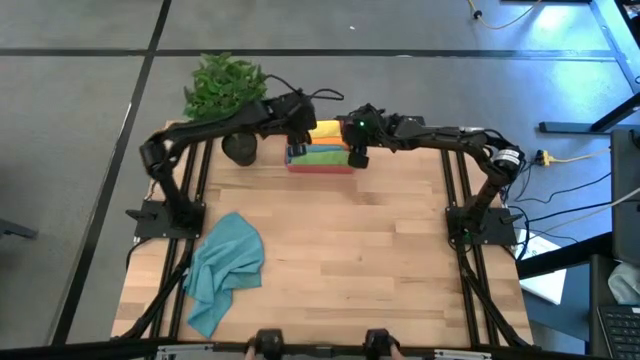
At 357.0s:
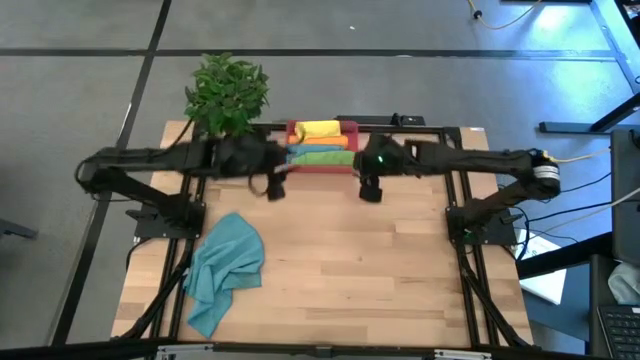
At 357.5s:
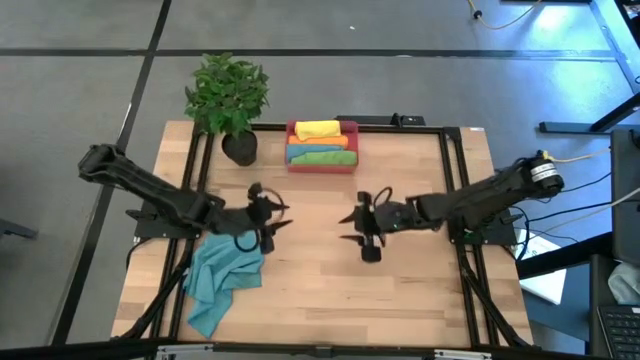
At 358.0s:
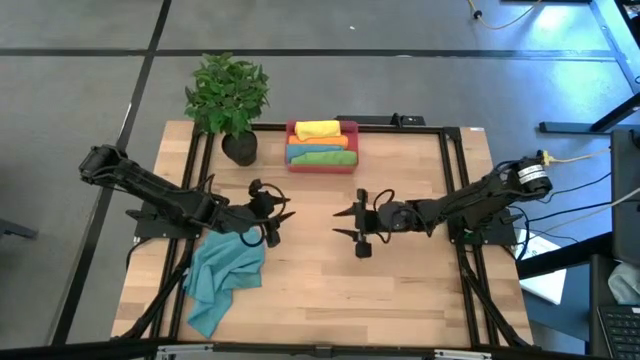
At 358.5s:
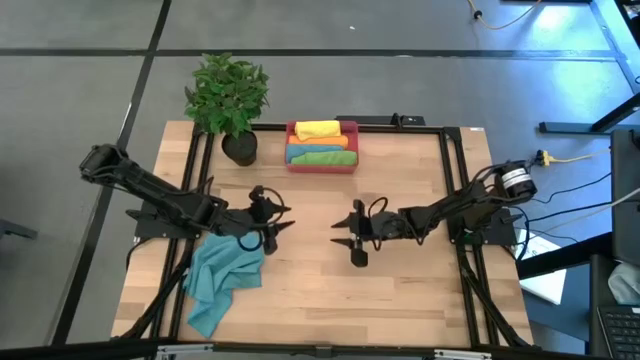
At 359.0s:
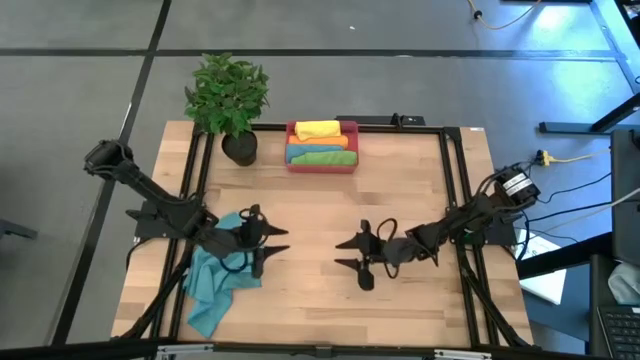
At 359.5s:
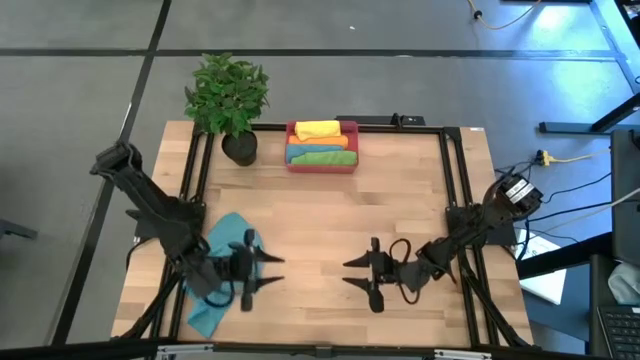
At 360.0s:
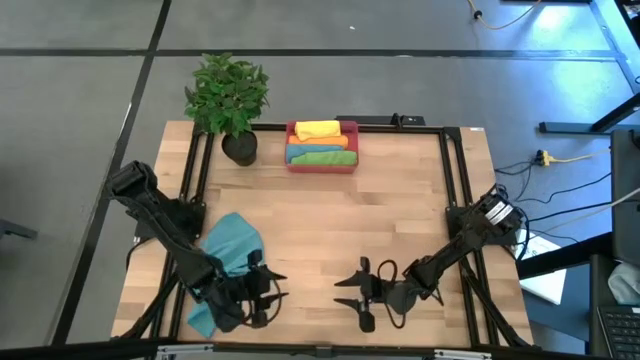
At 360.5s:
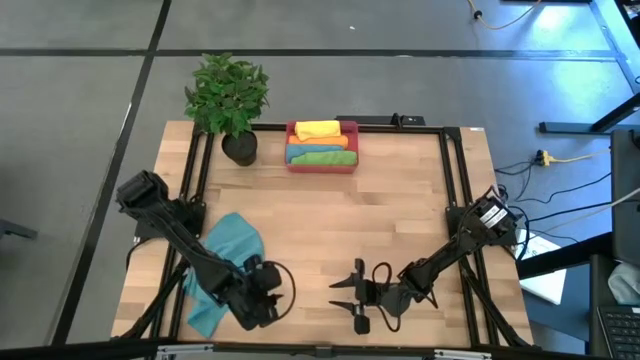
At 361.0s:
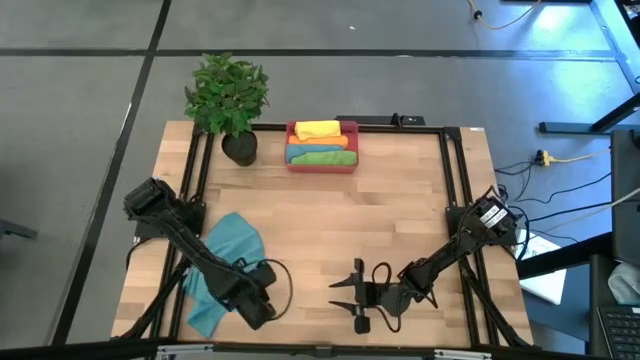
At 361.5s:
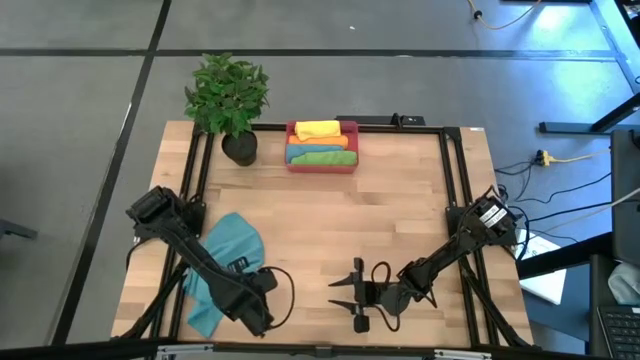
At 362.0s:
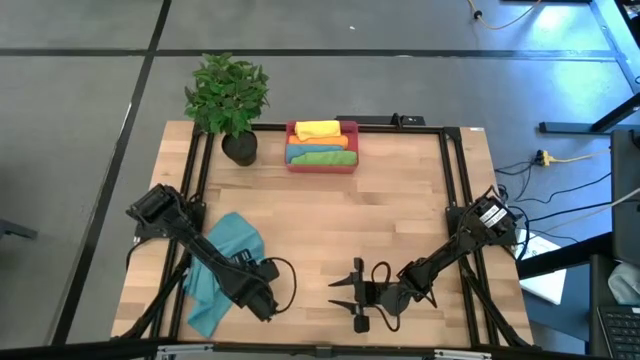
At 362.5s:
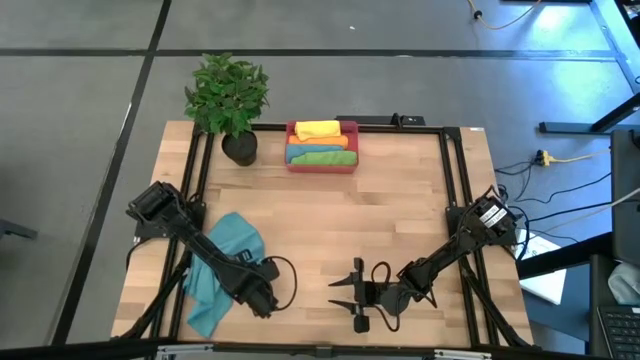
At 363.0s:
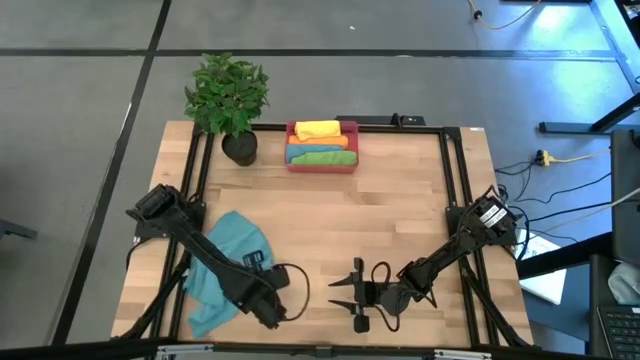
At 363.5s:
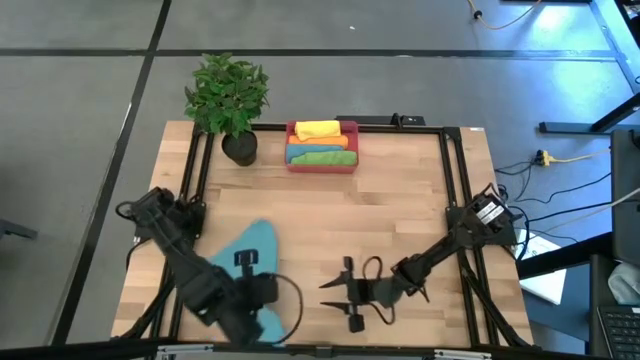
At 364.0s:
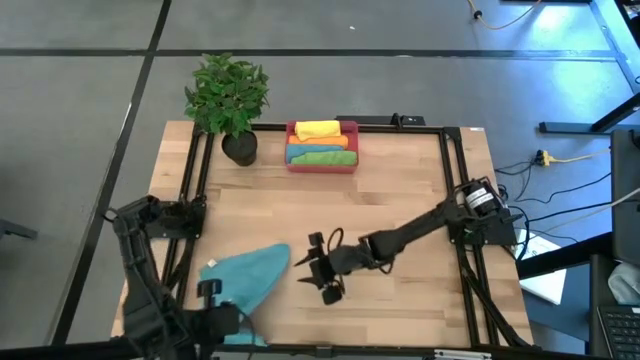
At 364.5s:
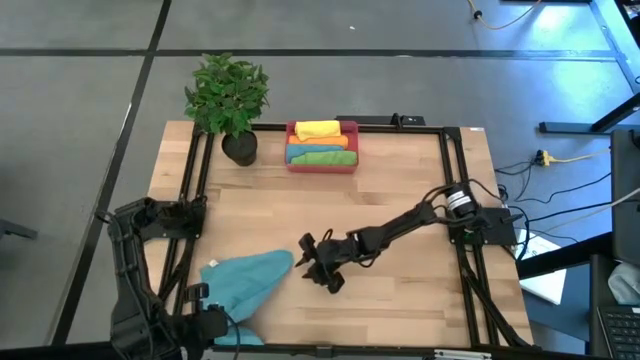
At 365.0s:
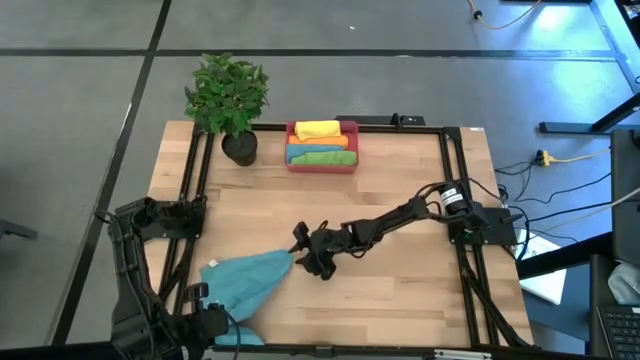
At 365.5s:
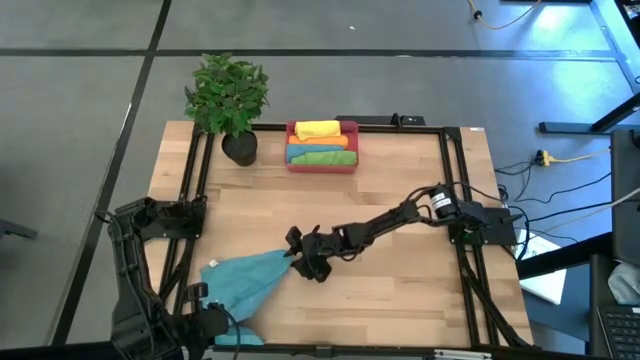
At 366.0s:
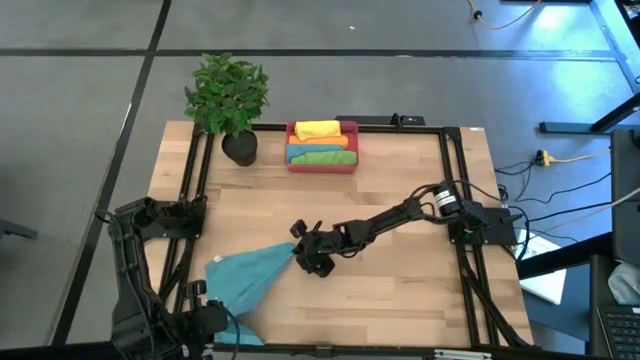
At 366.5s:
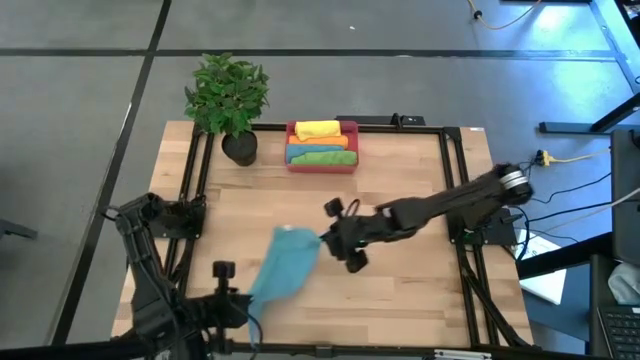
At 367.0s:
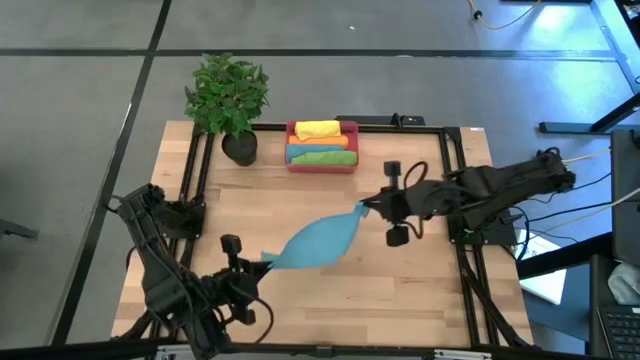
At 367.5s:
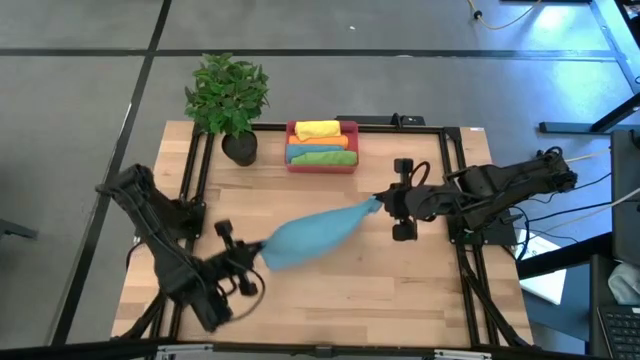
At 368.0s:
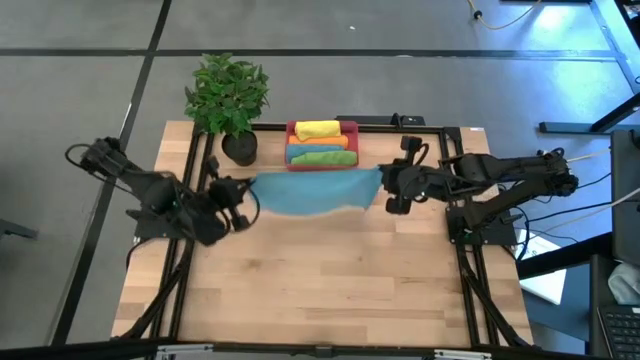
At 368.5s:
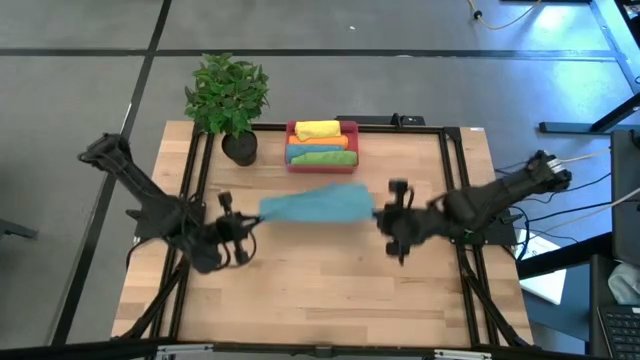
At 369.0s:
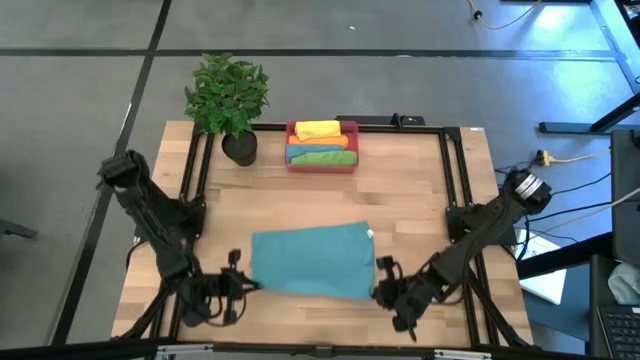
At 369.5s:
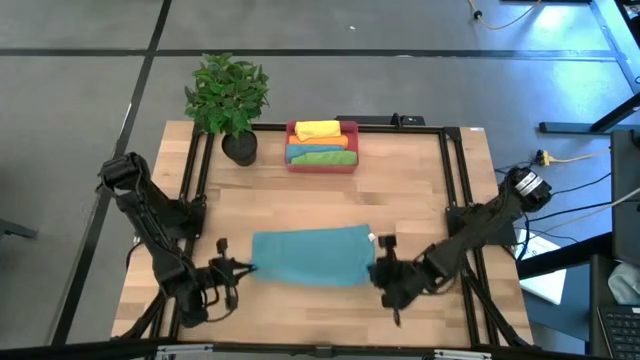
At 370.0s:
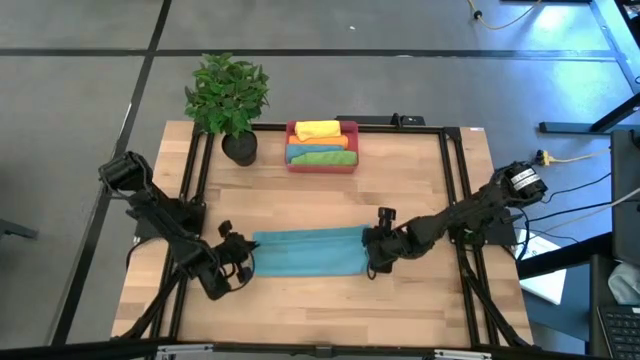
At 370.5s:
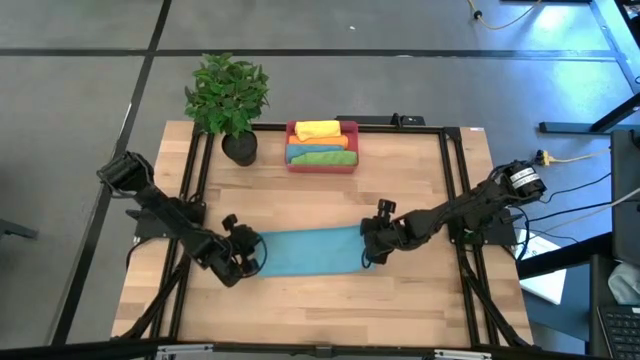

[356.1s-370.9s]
Task: Roll microfiber towels into tight, uniform cylinder then place into a basket
Fold the blue towel

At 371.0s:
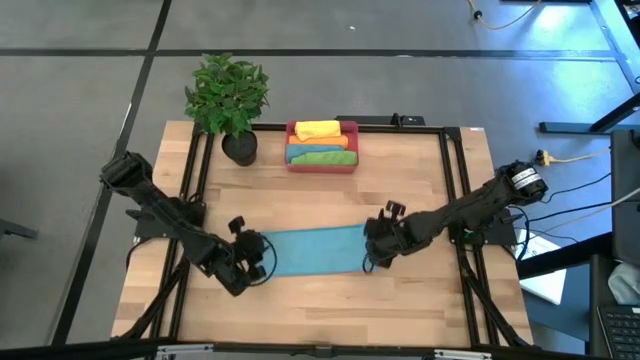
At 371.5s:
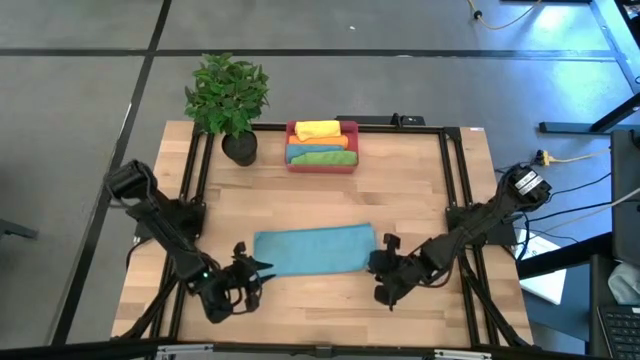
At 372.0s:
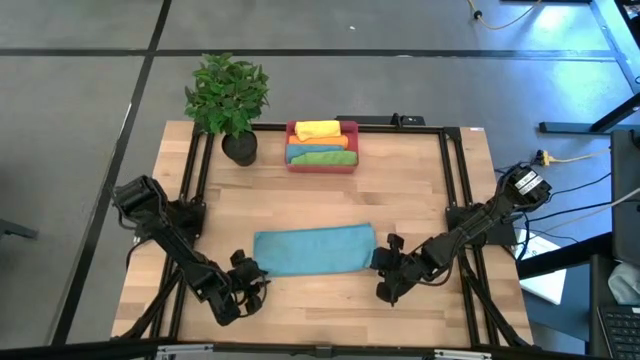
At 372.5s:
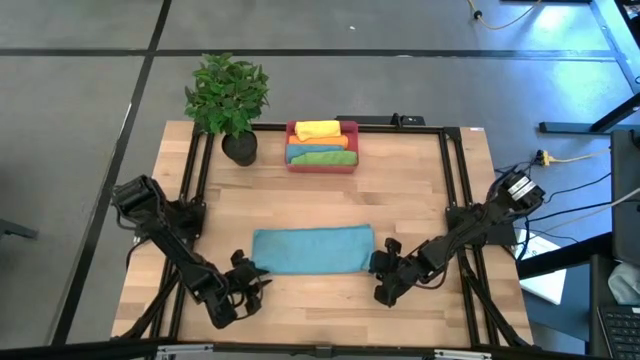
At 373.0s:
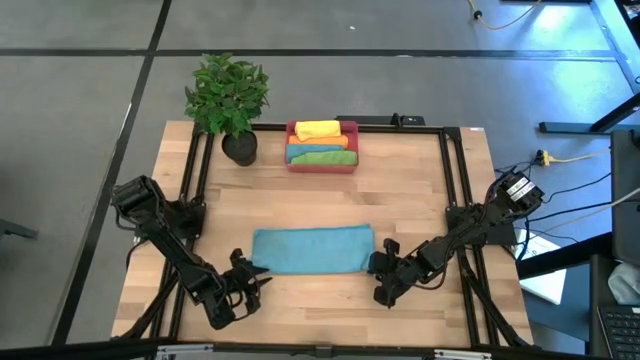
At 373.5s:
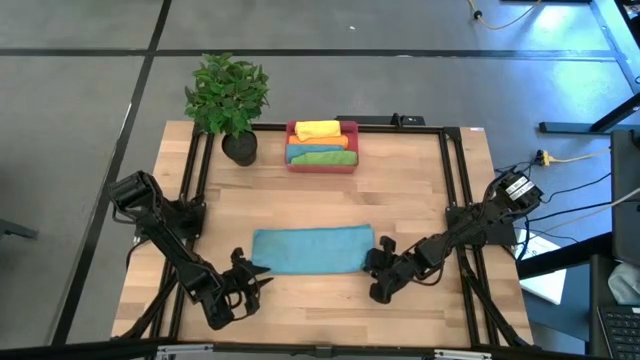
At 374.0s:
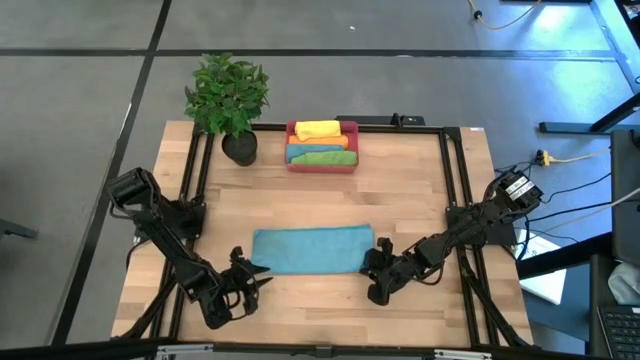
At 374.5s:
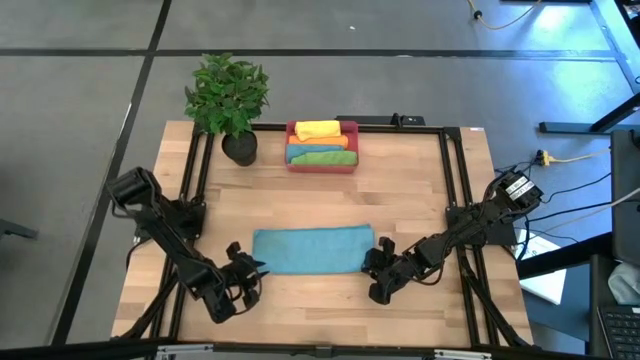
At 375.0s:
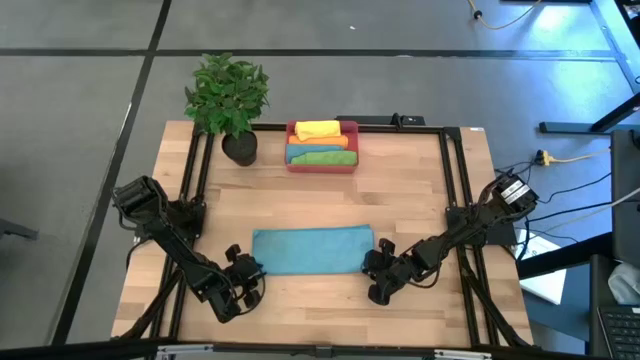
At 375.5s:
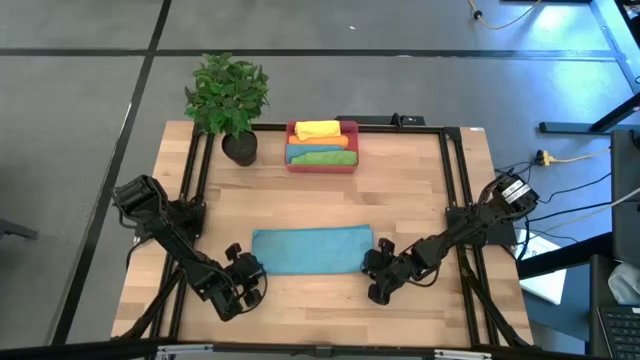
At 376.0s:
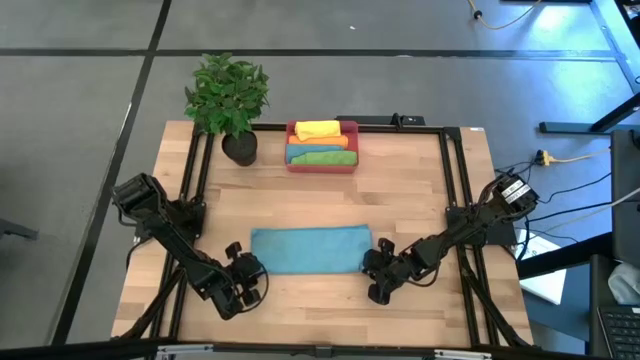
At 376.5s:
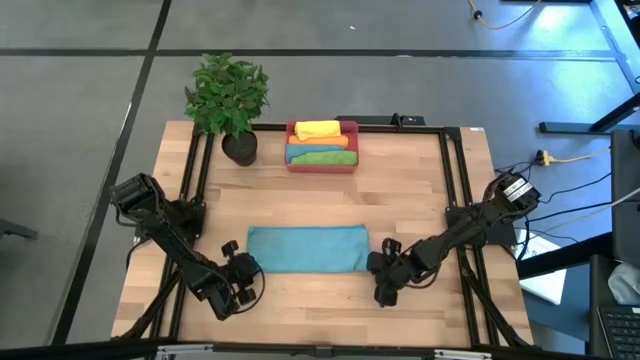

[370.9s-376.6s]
Fold the blue towel

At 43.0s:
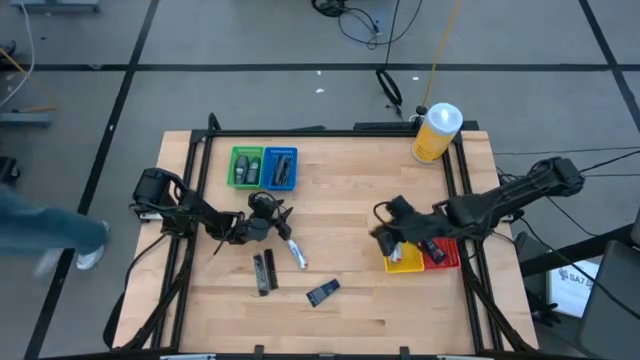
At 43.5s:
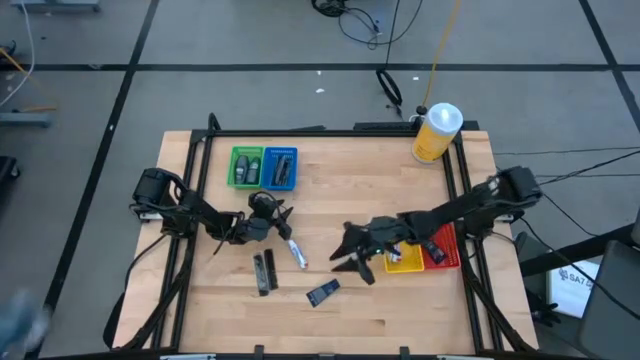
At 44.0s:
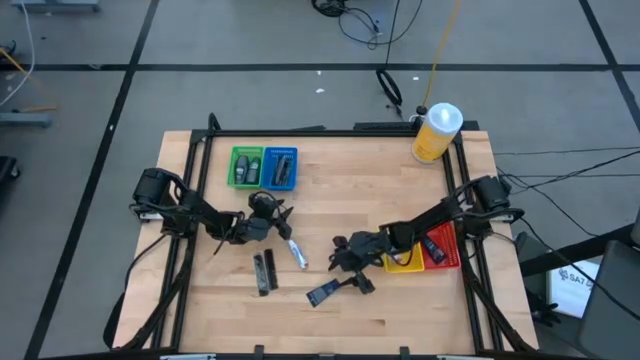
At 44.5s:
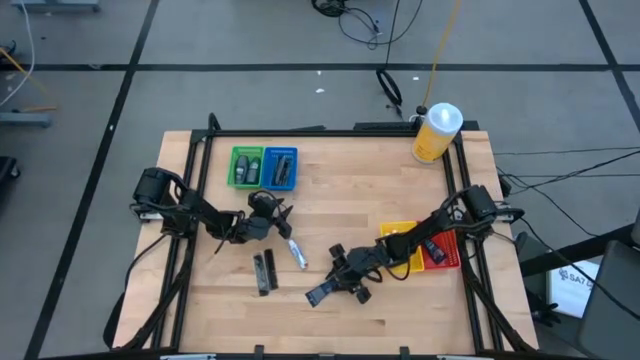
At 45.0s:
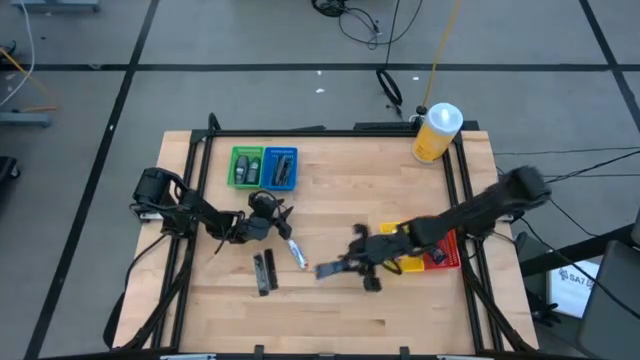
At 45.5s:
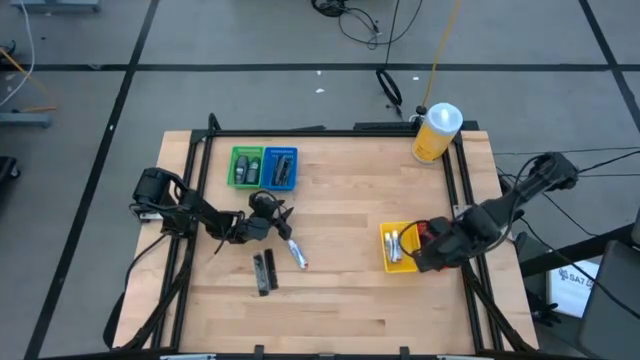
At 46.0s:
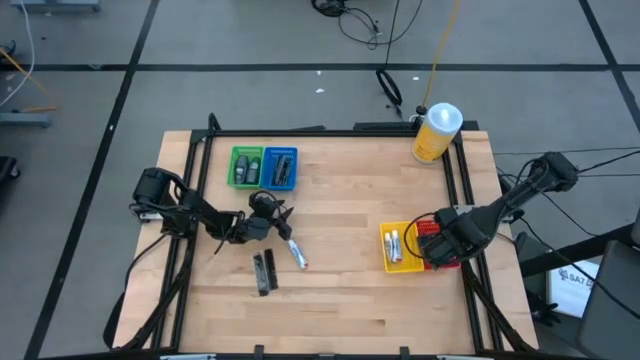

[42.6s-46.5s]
Task: Pick & Place Travel size toiletries
Put the black shave cream into the red bin
